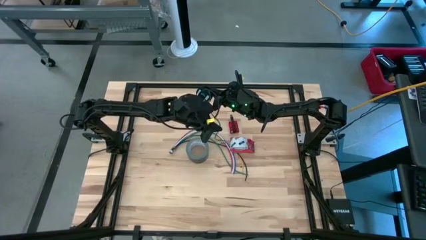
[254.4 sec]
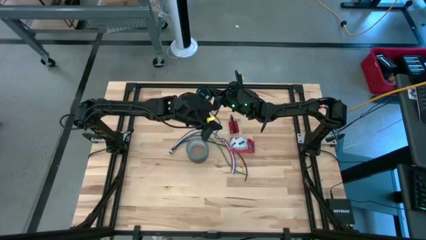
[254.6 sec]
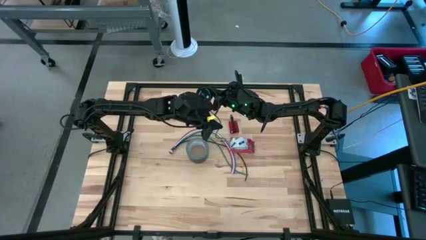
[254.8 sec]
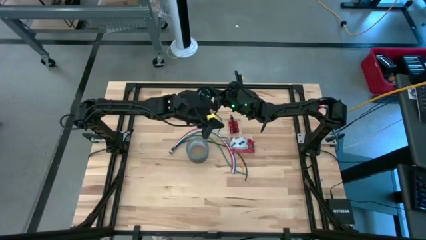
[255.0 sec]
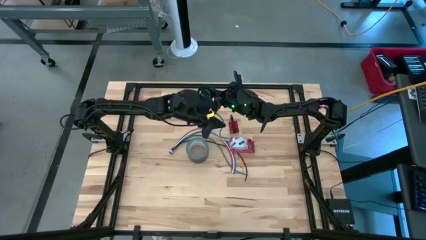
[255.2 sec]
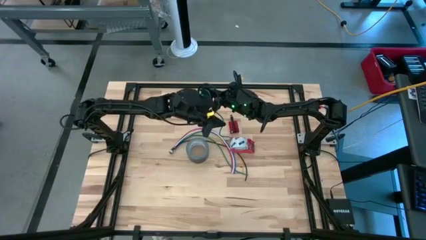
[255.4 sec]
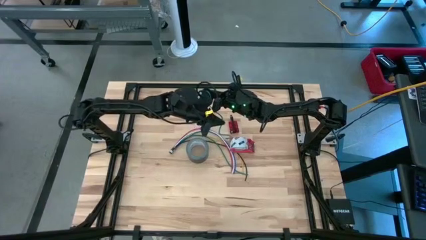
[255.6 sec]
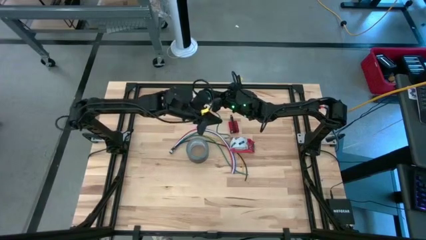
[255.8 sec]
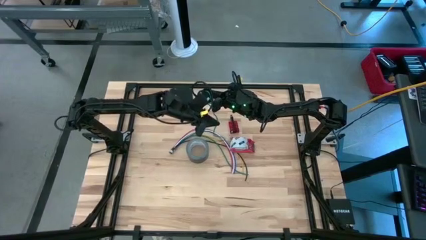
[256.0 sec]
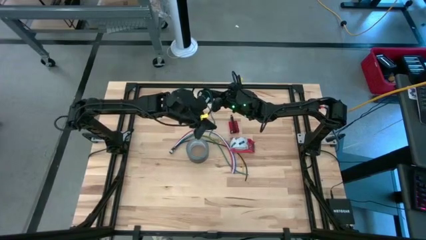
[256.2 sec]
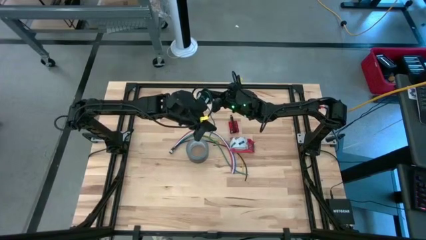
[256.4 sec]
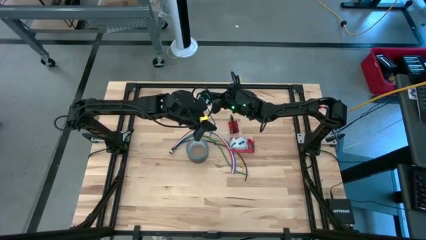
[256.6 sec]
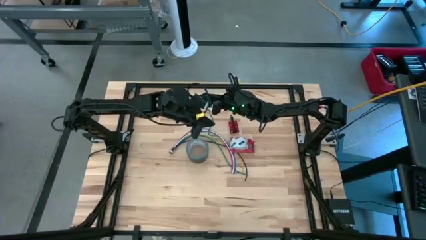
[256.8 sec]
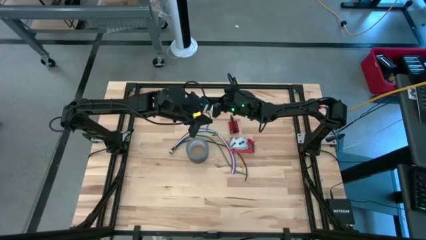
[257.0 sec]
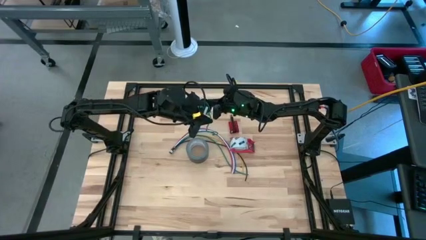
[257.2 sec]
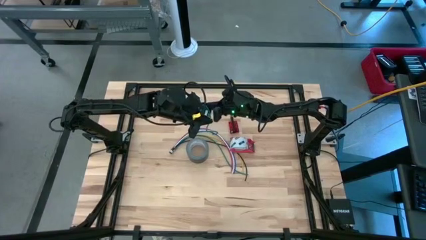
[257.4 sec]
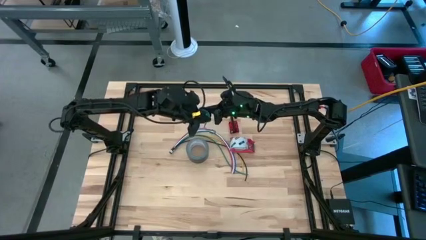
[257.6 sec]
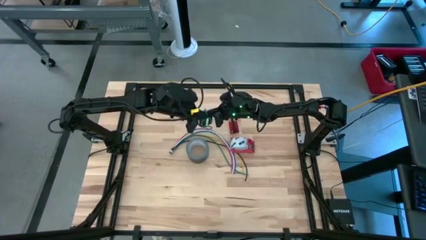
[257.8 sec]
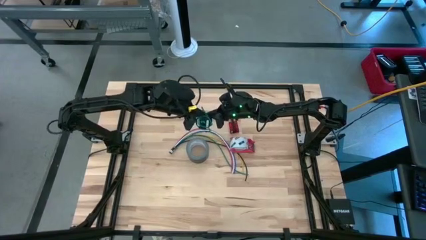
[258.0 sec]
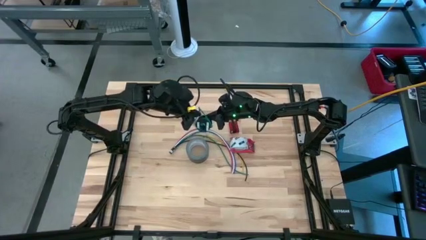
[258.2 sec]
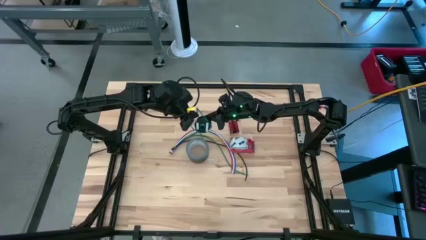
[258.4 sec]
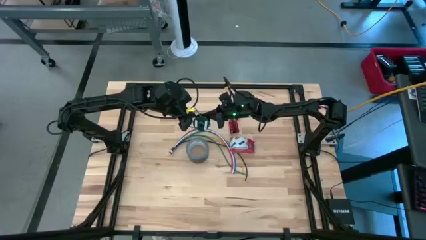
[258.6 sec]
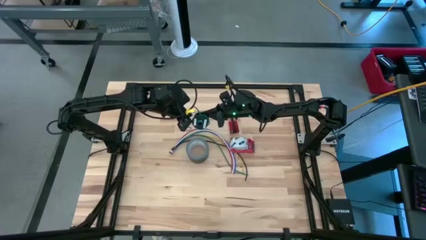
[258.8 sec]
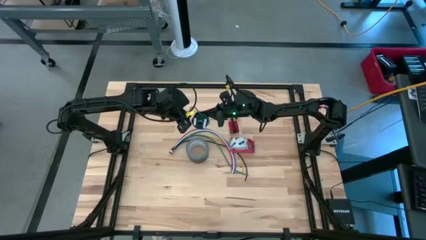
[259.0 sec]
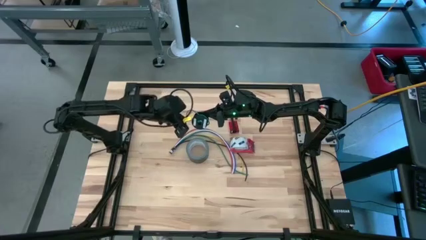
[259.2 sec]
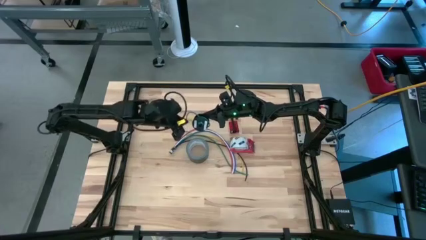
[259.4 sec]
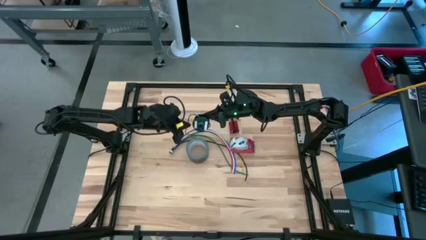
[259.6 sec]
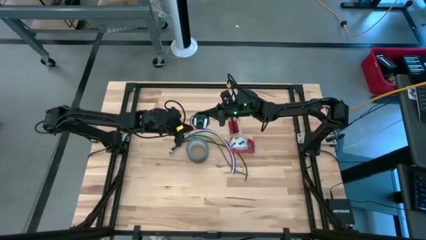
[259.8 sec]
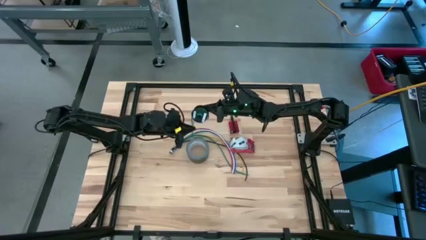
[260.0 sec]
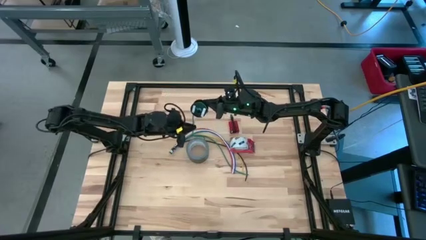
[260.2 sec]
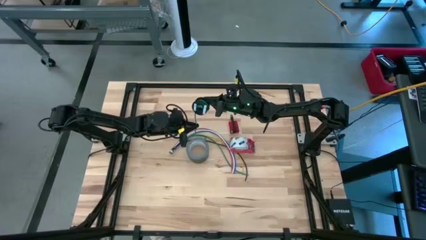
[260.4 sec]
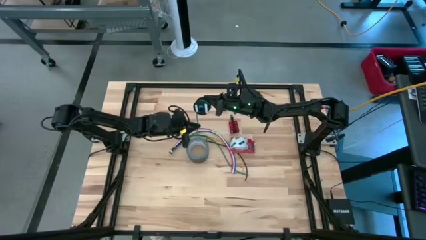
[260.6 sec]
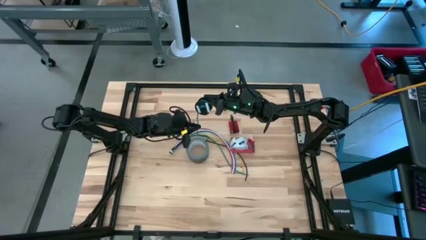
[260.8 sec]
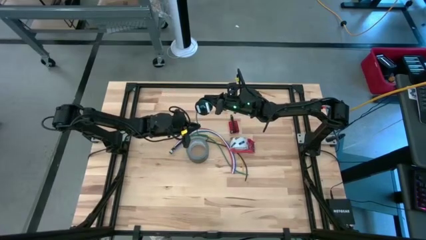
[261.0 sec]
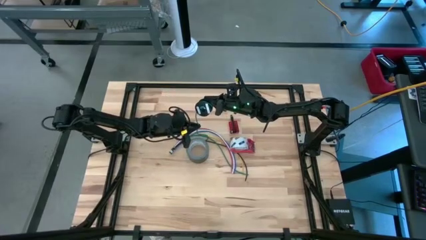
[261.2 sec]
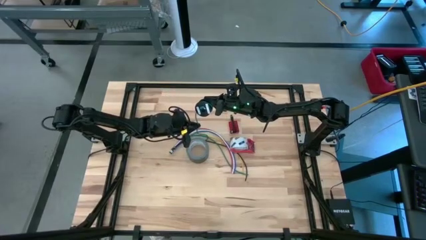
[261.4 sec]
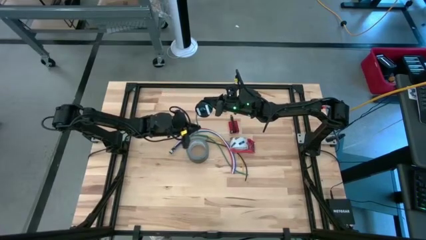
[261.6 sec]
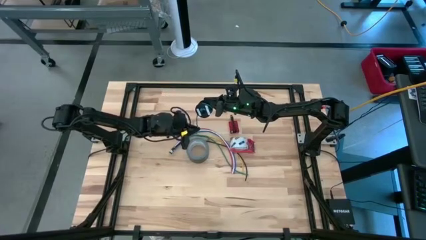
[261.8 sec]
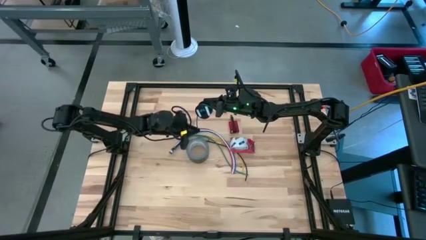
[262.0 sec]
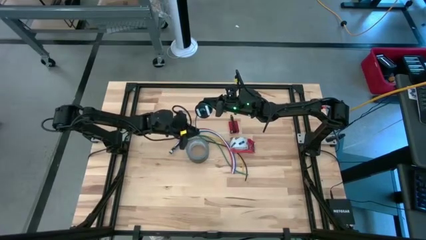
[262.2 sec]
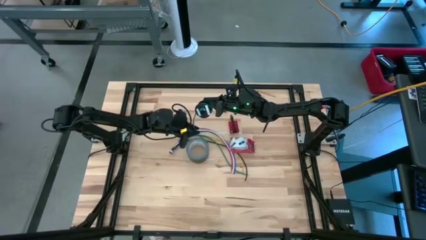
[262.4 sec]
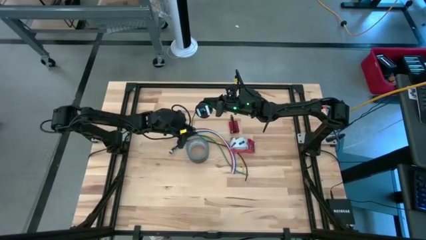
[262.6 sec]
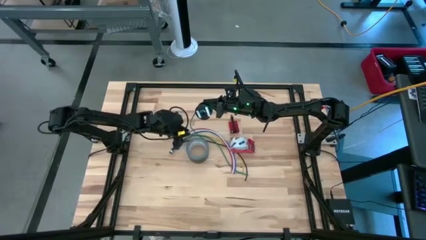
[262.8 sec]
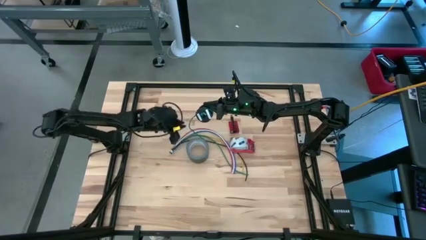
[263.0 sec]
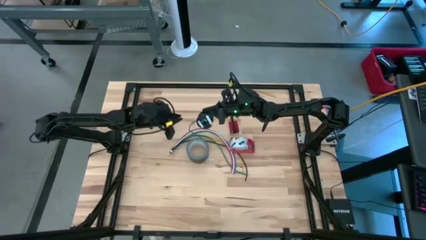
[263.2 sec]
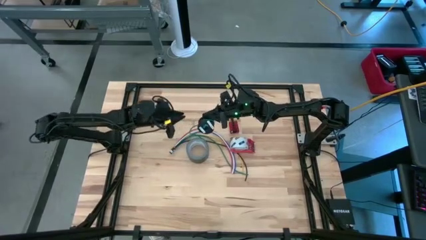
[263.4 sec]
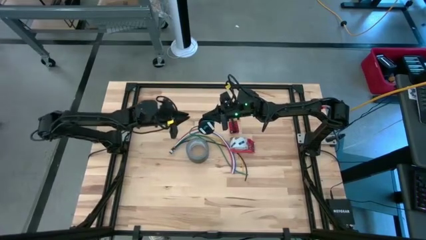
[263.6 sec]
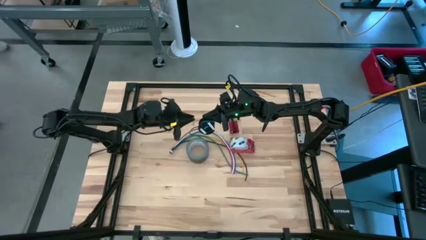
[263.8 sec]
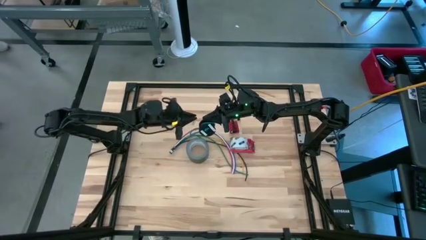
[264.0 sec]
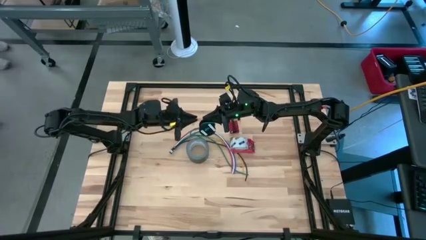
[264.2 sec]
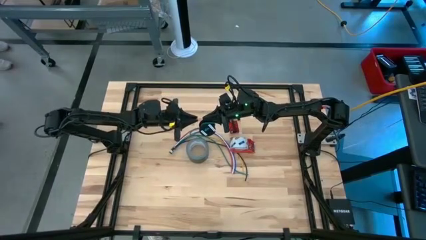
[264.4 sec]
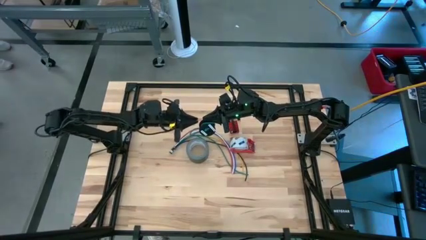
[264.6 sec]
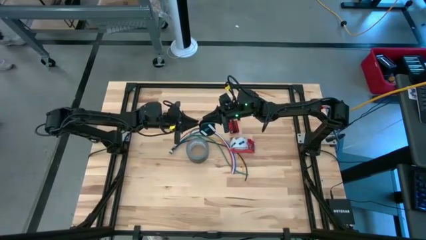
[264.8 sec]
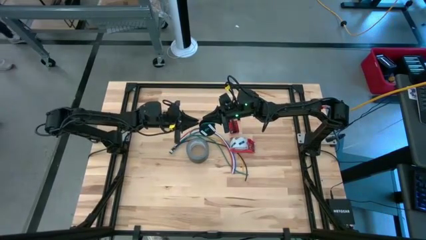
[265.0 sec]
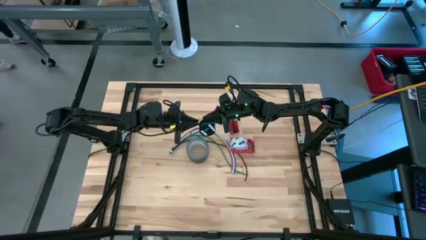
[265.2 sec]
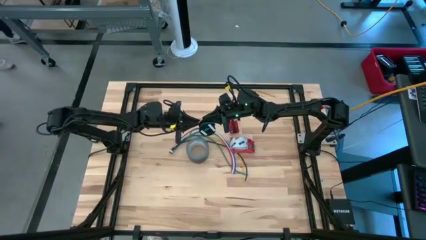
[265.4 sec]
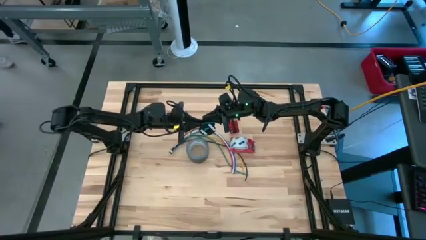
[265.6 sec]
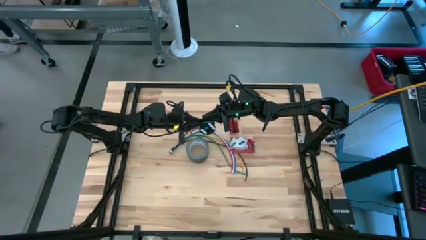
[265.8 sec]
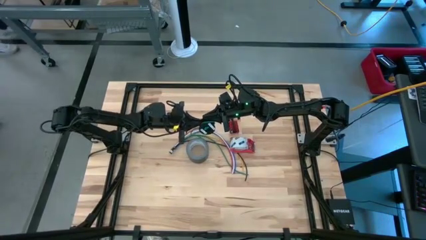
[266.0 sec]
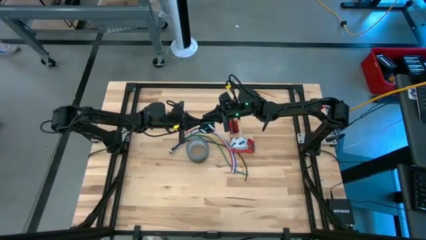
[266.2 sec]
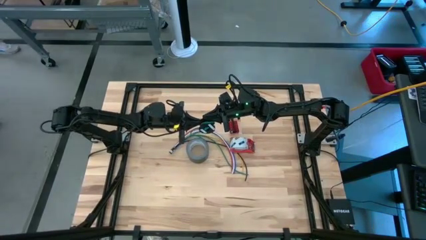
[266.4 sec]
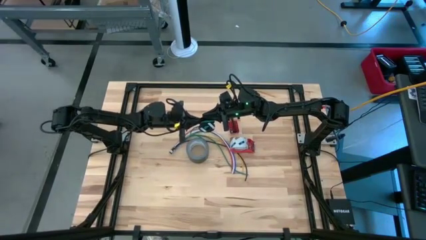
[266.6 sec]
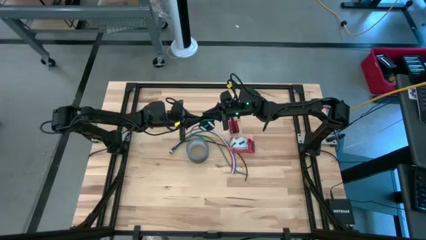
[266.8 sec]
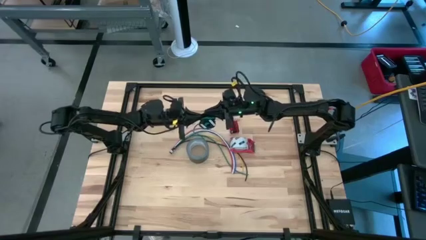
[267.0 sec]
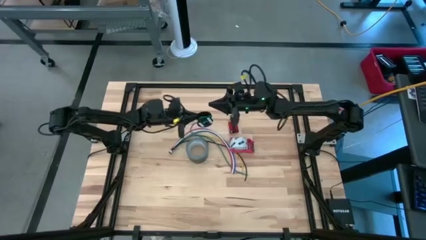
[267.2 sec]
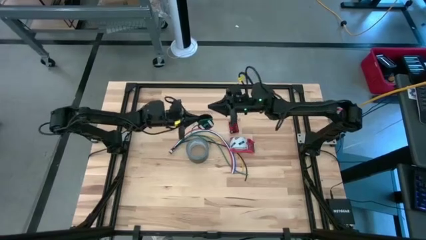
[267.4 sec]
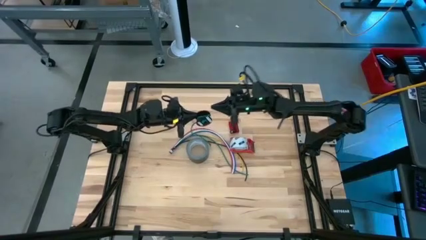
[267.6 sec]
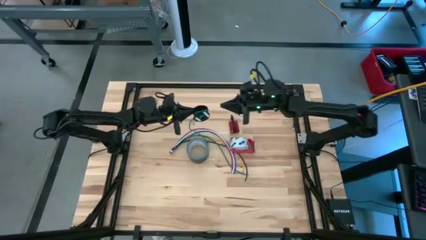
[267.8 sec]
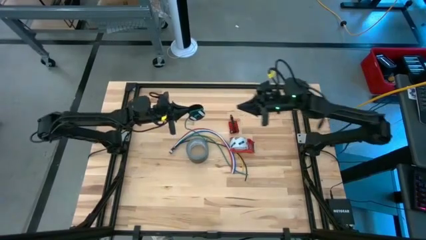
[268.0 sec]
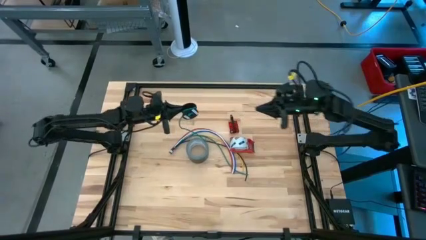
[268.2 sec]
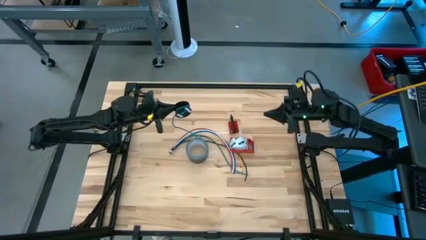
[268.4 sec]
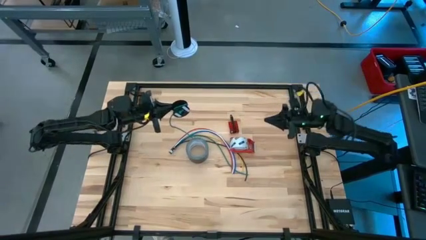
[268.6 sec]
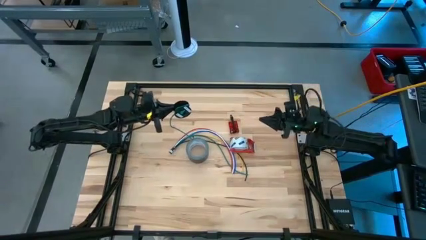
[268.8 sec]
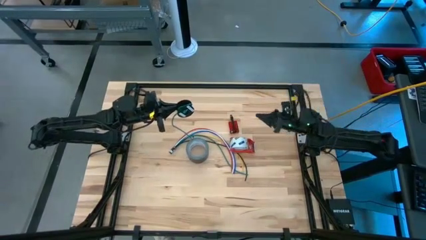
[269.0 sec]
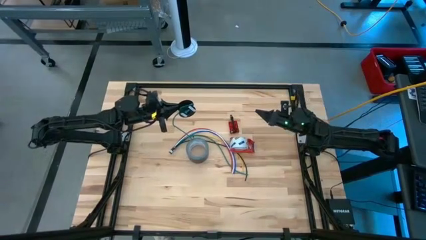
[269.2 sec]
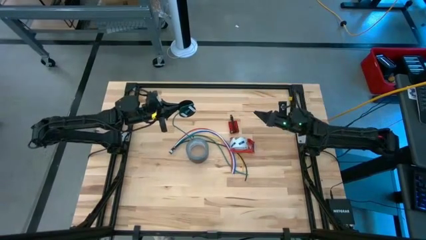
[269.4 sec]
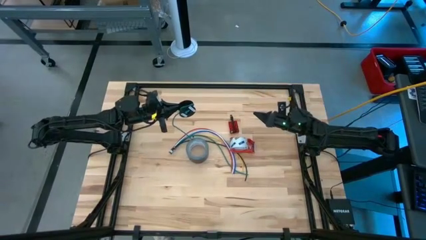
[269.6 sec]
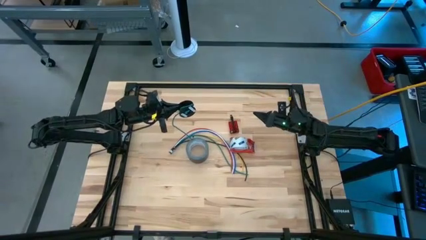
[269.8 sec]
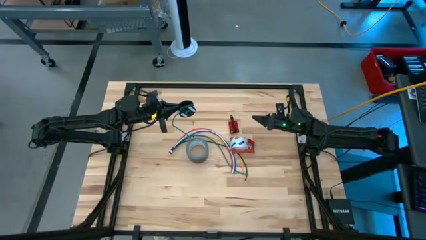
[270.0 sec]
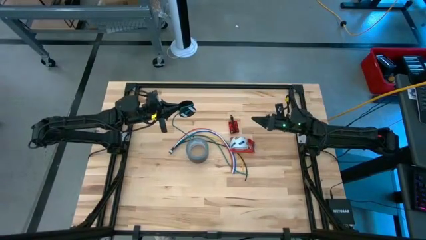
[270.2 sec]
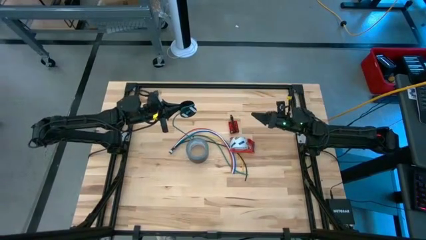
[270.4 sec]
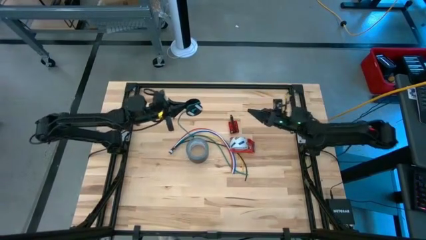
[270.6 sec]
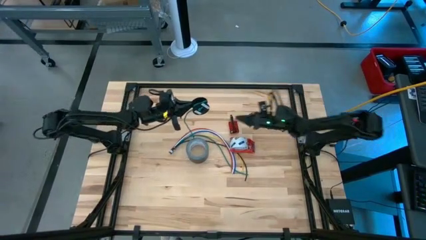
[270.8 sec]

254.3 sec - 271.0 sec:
Task: Coil cords
Coil the green wire onto the black spool
